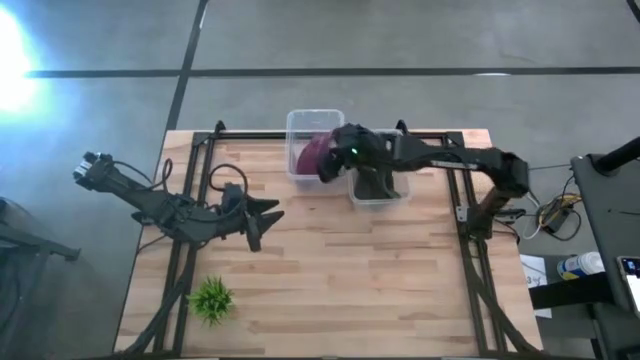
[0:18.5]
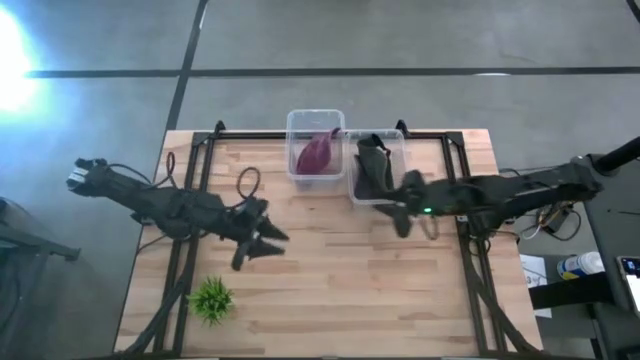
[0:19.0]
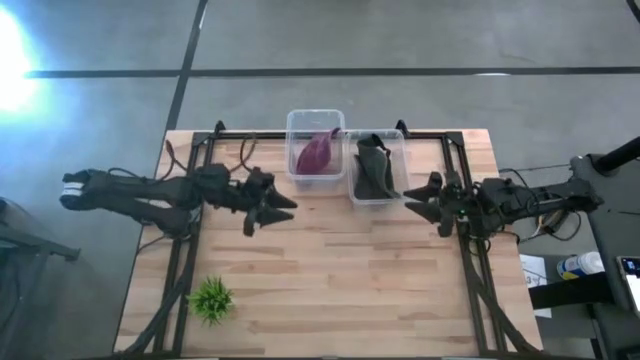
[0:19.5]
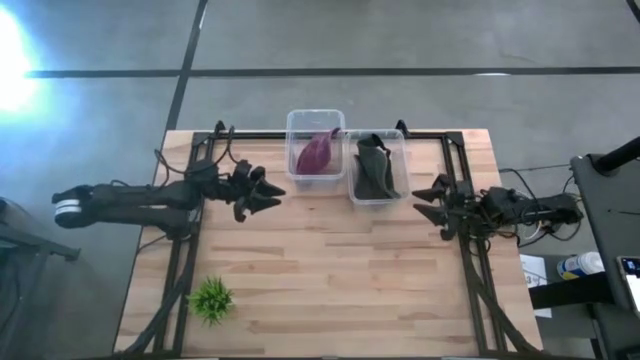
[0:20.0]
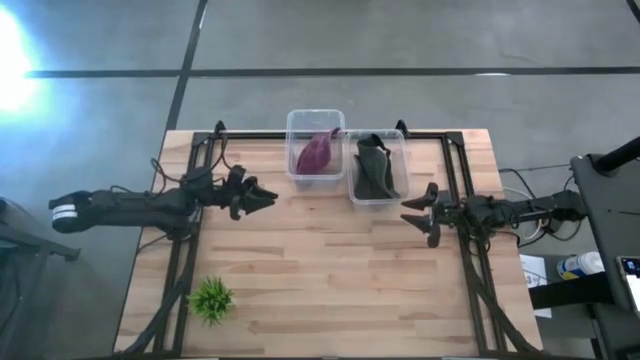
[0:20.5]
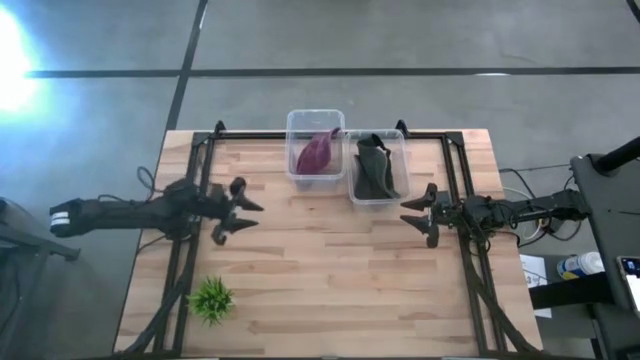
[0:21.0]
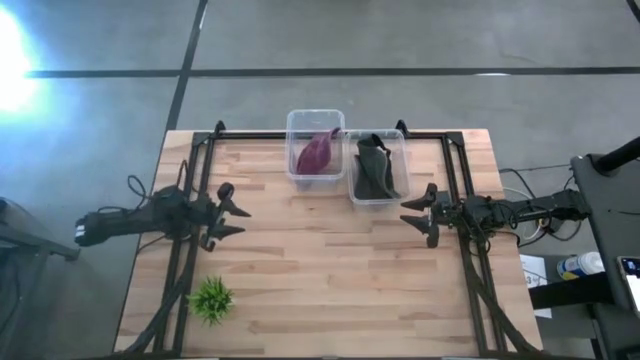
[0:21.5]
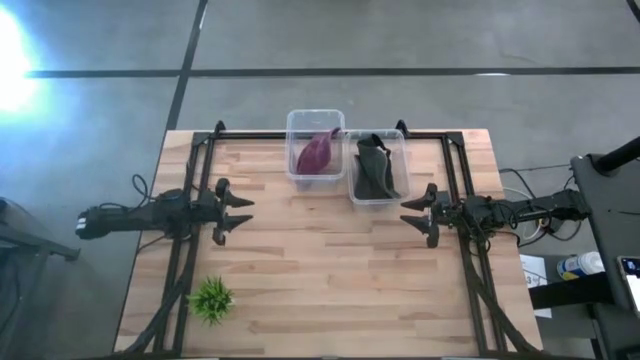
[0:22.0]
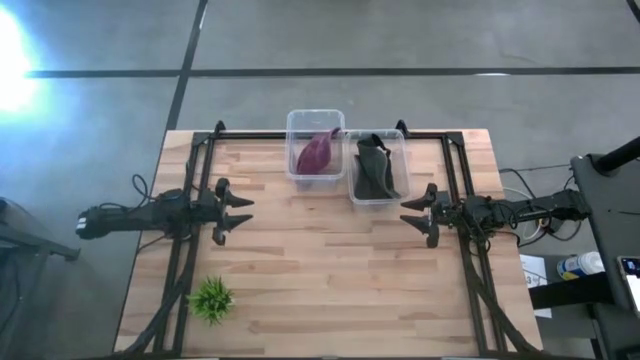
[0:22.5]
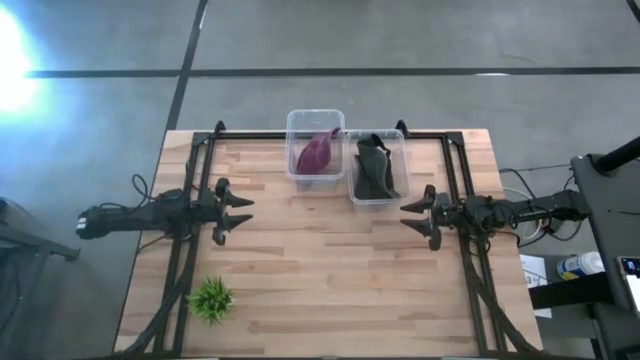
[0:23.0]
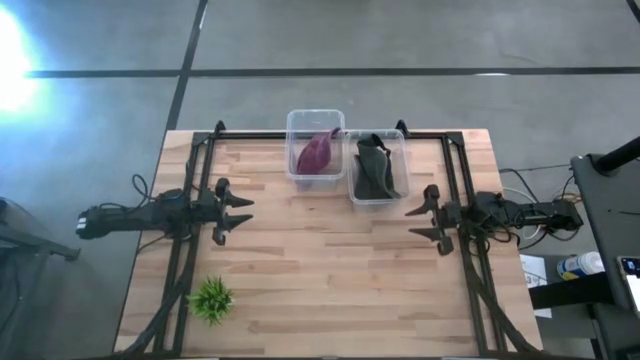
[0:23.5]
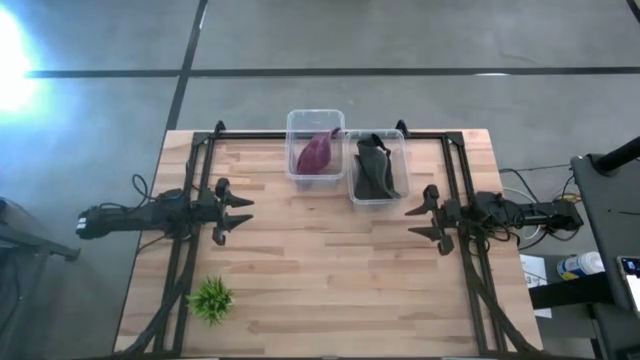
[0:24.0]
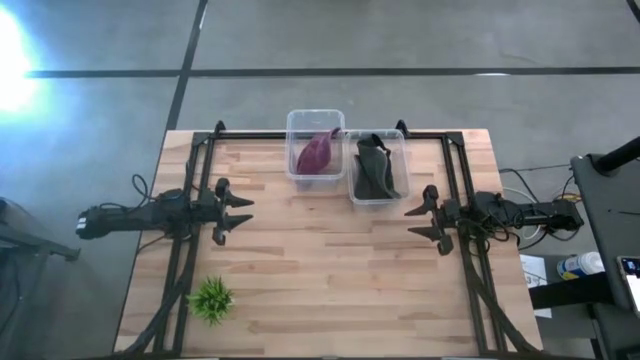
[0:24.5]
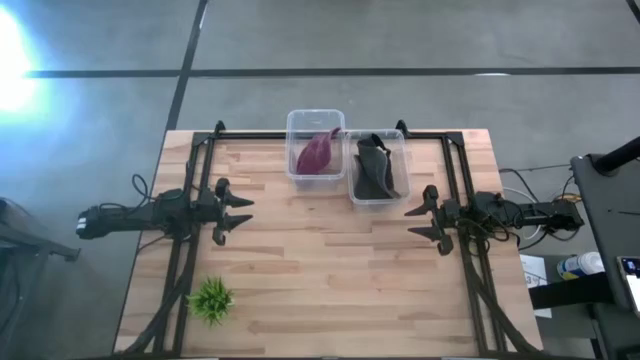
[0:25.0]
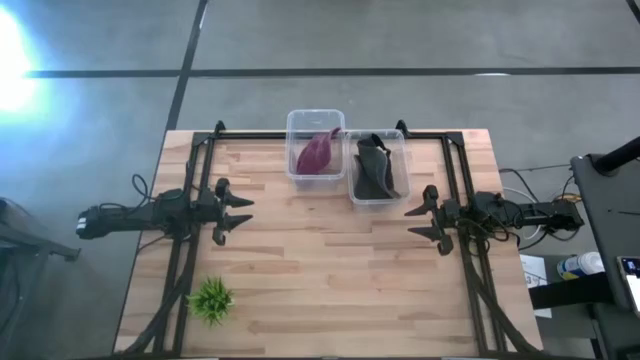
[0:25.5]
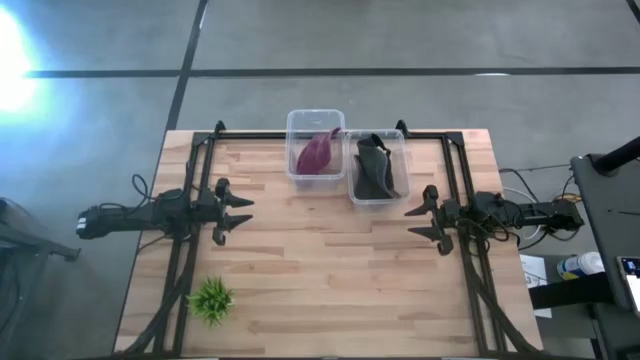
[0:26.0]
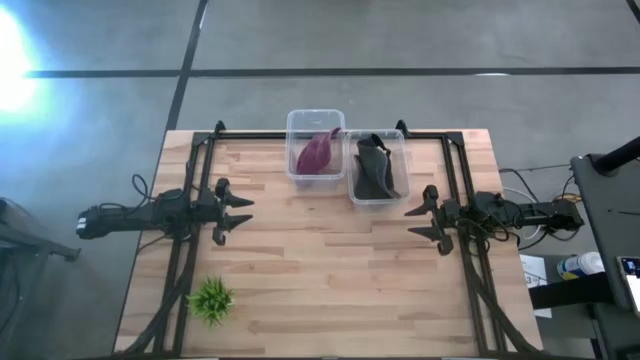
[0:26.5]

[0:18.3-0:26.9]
Task: Pick & Place hat
Return to Home Position

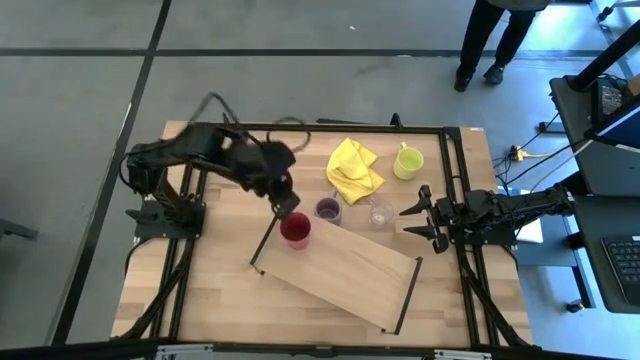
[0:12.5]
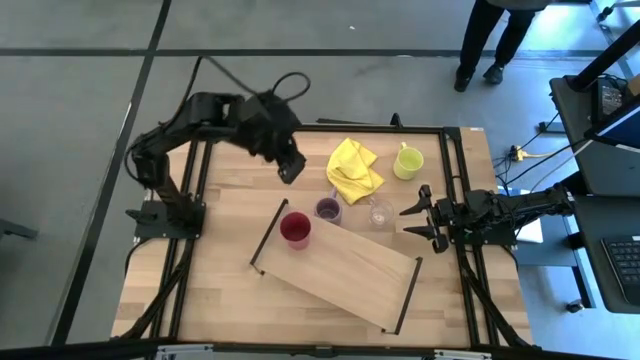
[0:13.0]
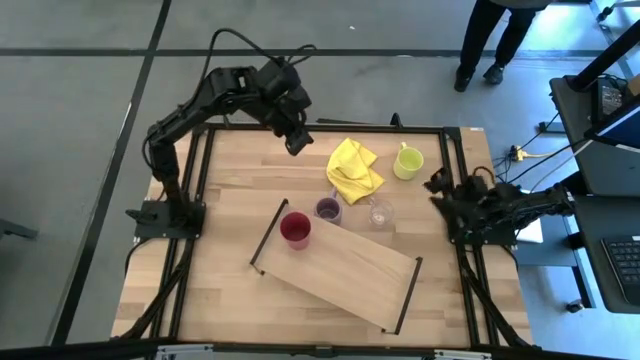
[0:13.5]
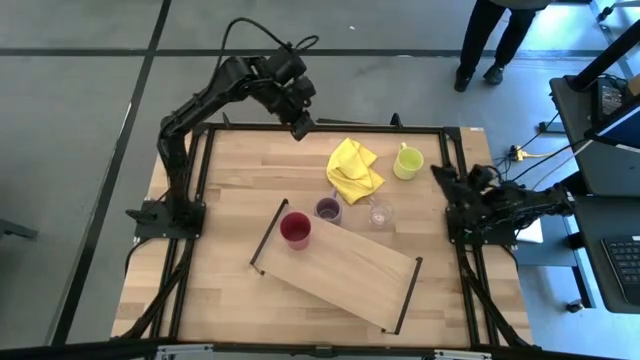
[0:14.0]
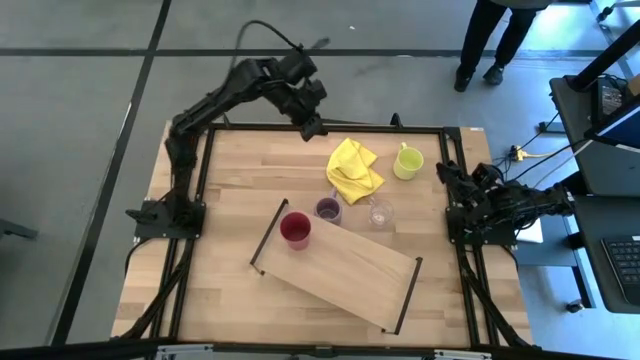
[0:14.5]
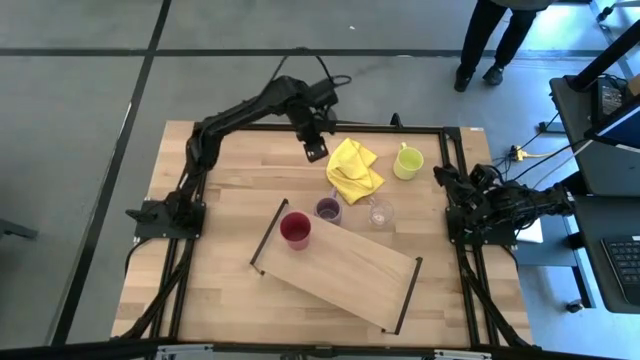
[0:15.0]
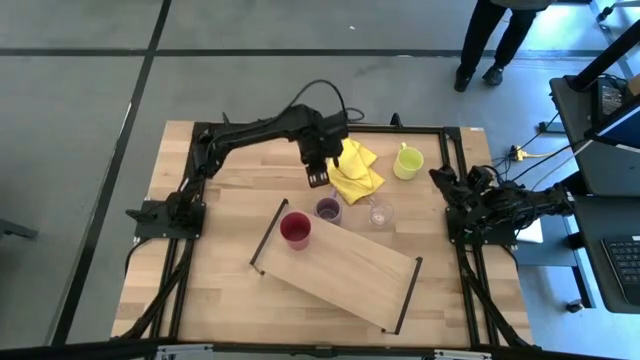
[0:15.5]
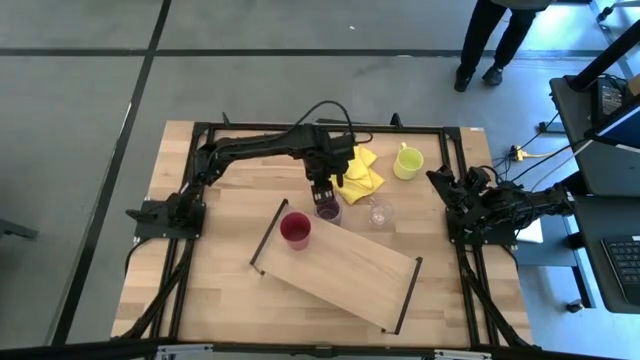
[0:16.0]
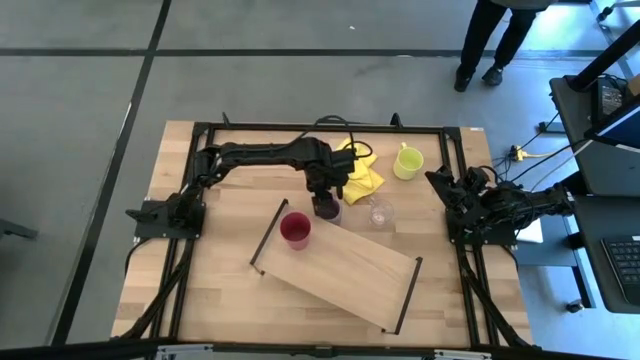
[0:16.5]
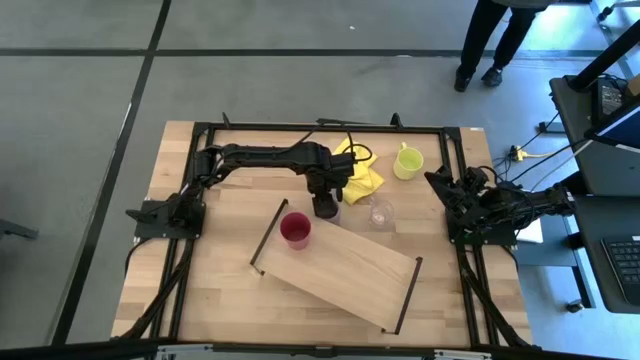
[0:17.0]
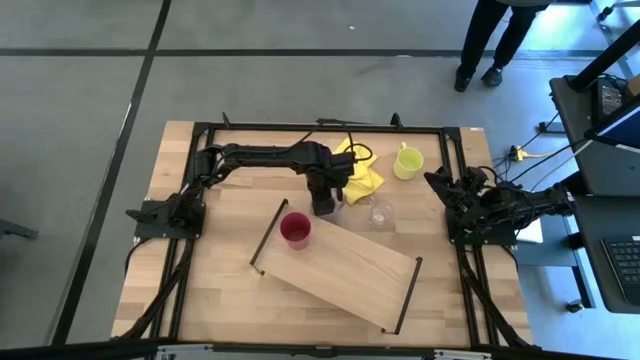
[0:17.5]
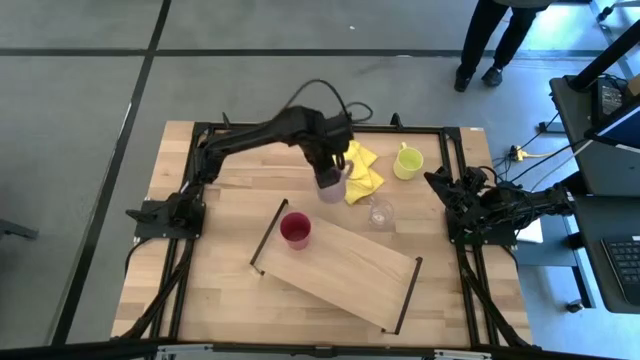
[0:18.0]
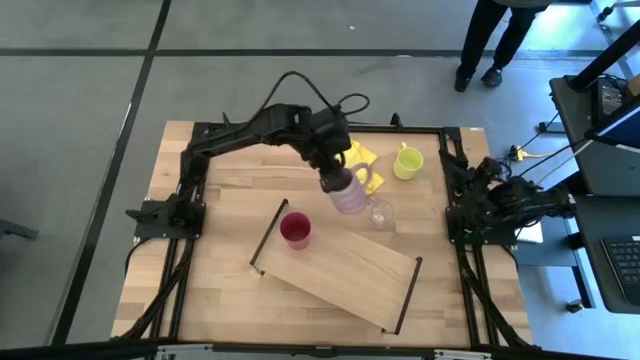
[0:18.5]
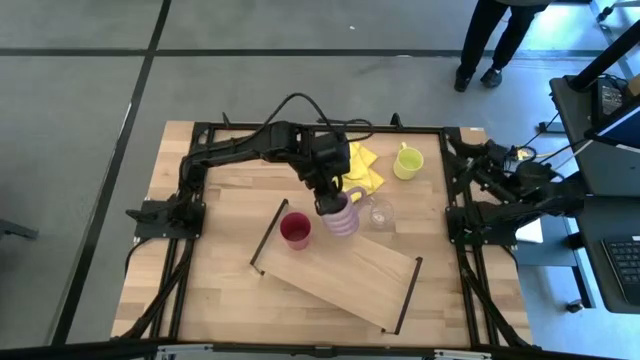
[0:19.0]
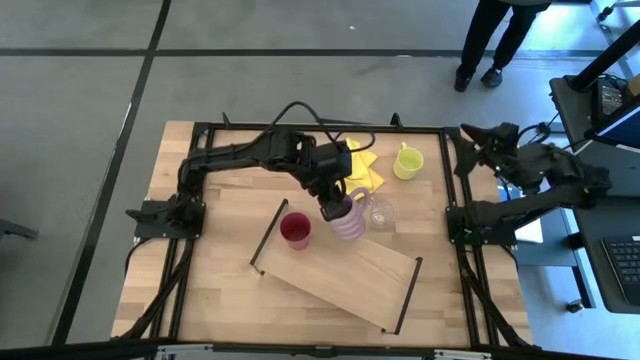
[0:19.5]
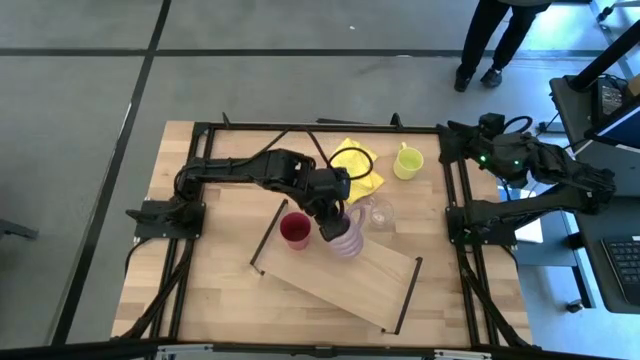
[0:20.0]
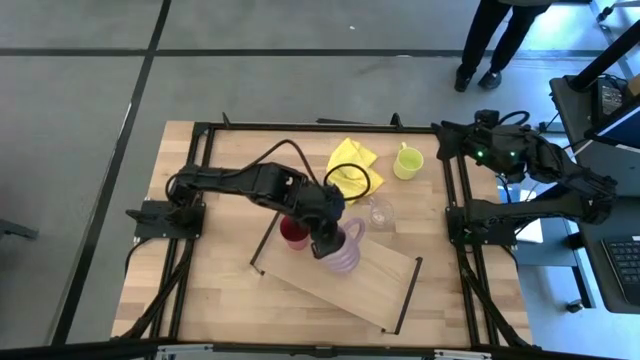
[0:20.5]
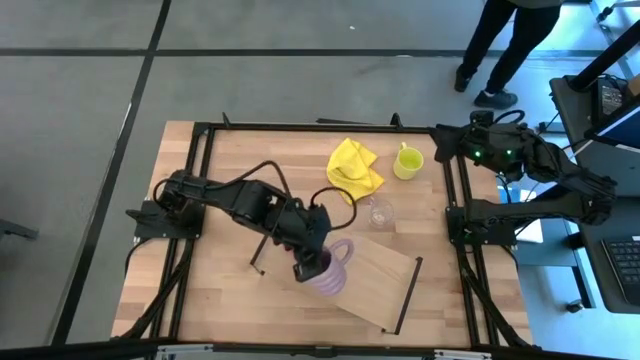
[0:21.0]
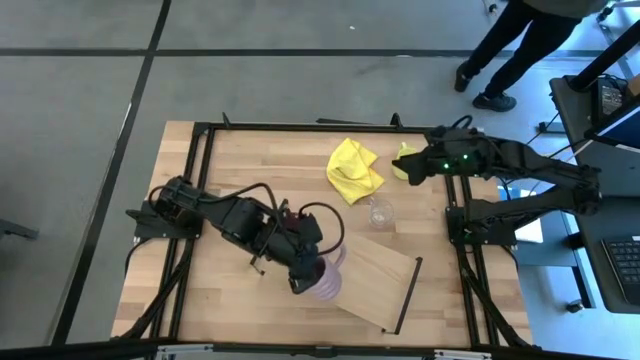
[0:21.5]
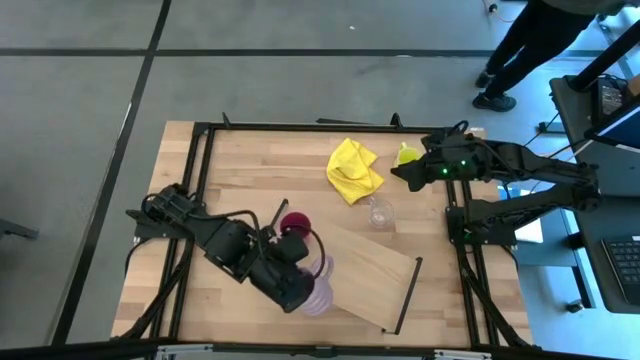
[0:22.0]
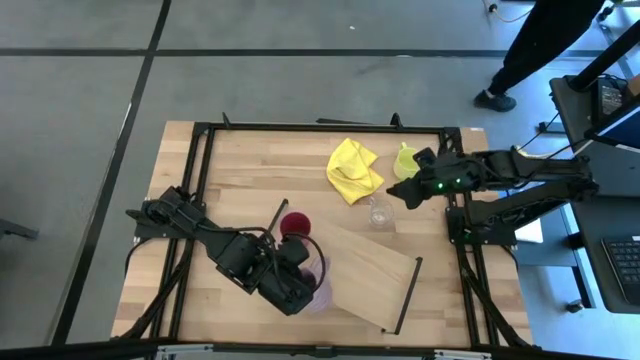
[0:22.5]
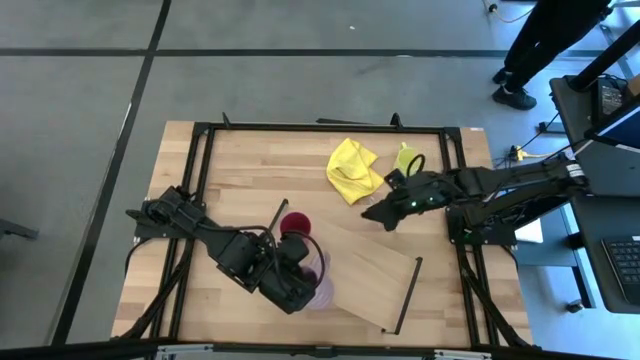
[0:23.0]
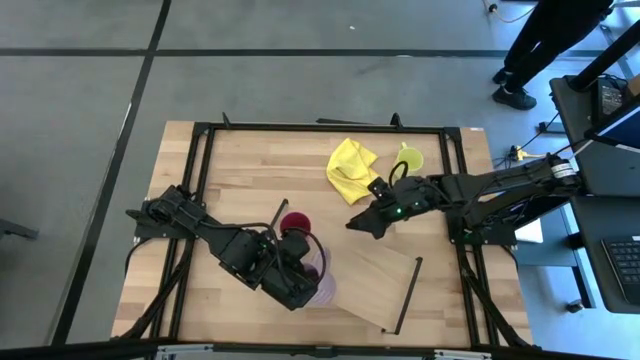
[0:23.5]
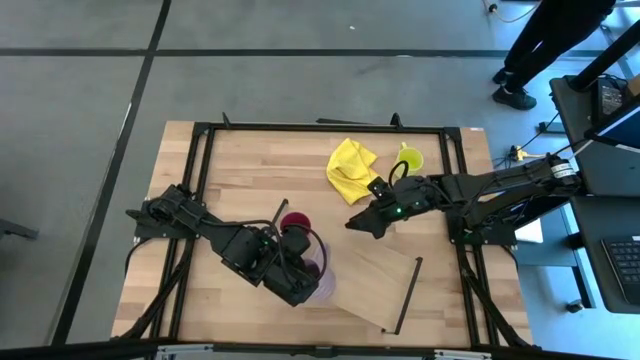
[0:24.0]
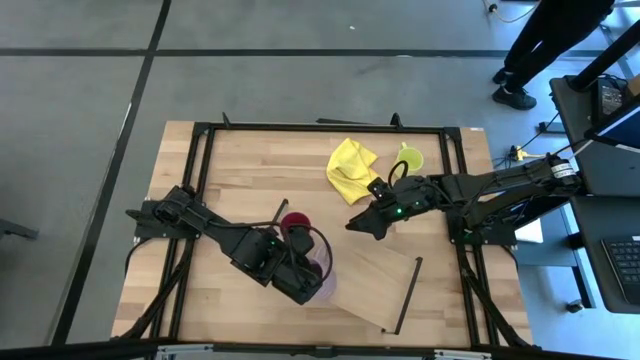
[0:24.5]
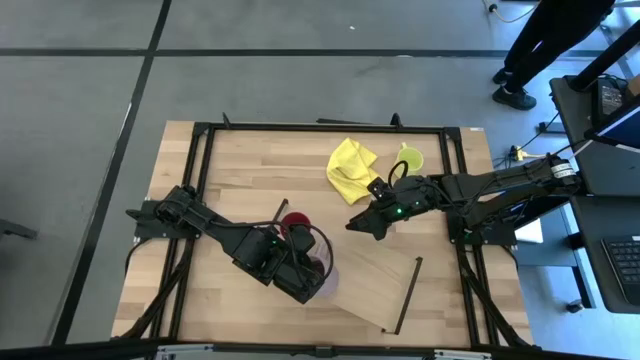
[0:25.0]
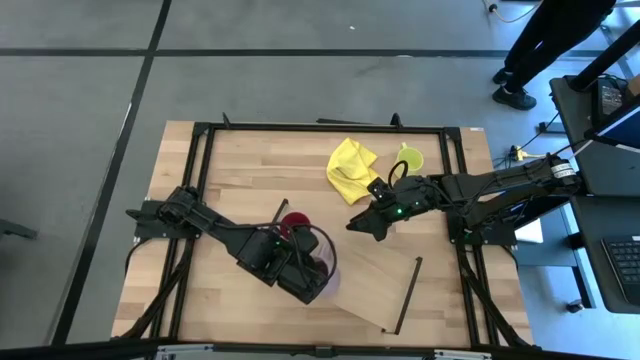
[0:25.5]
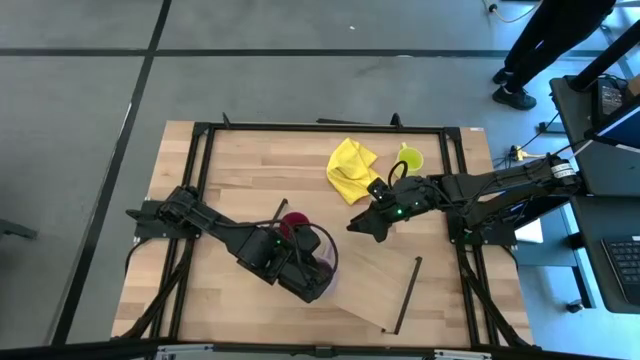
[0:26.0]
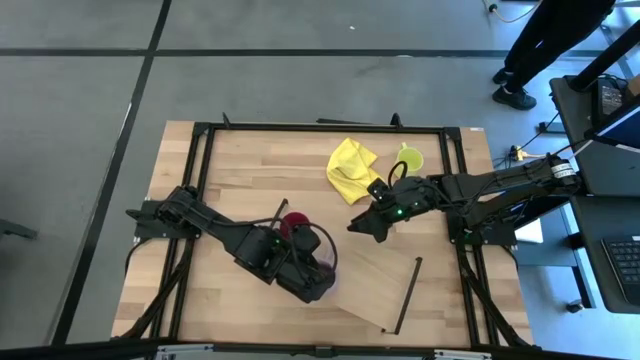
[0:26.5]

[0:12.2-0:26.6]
Task: Stack small to large cups/mugs on shelf
Put the purple mug on the shelf
